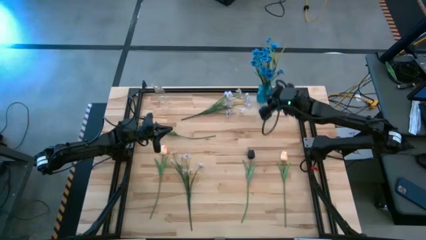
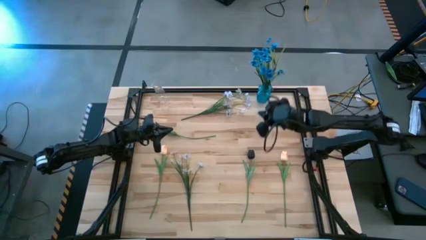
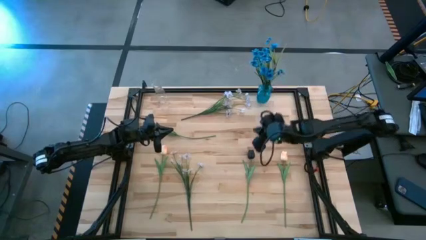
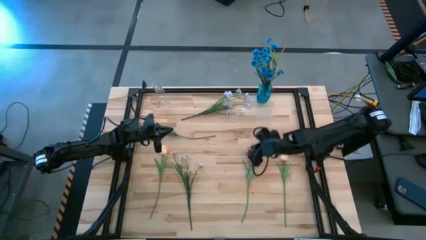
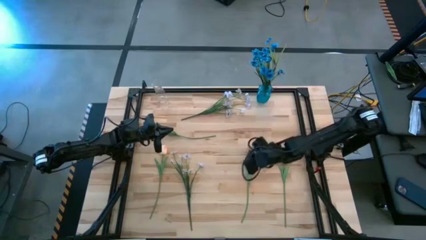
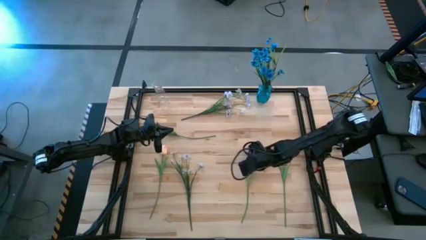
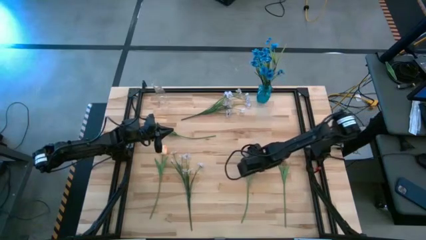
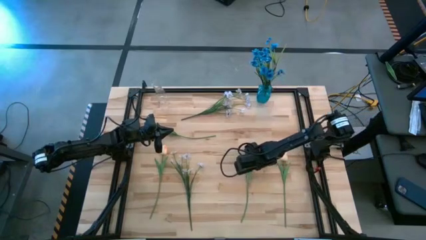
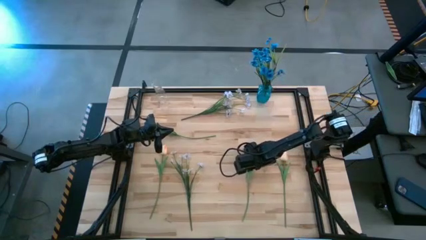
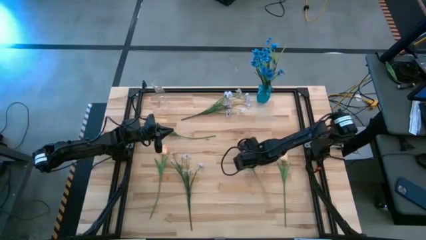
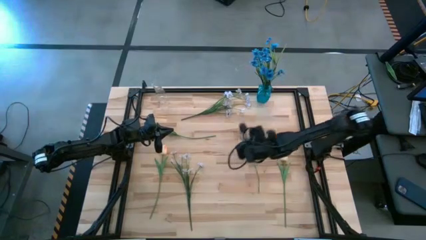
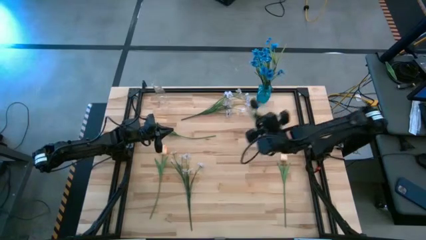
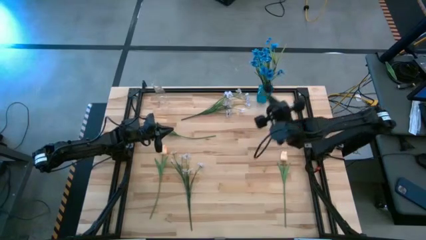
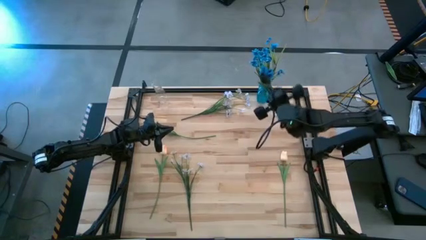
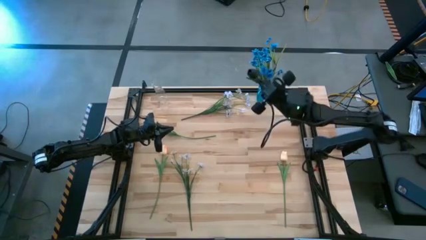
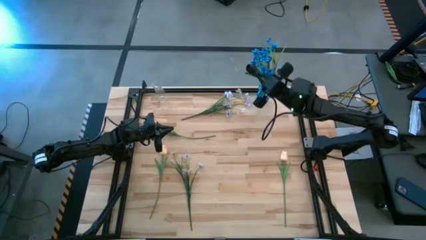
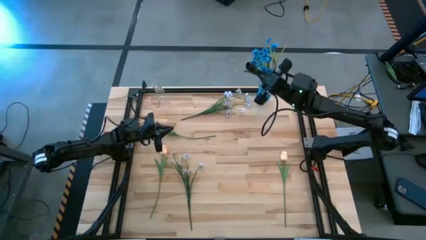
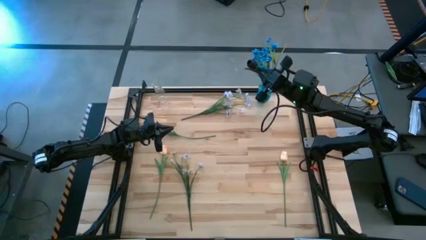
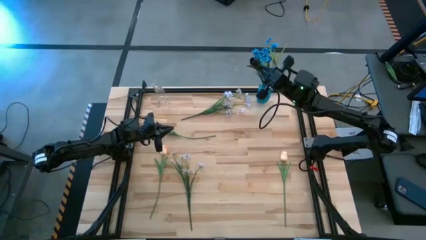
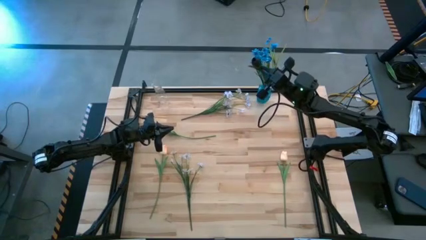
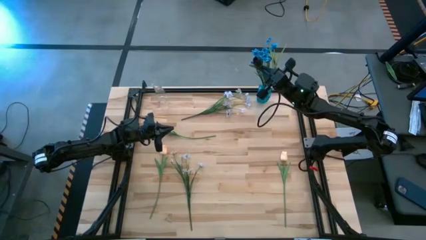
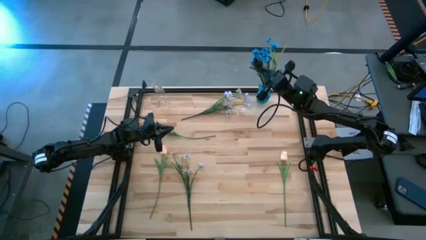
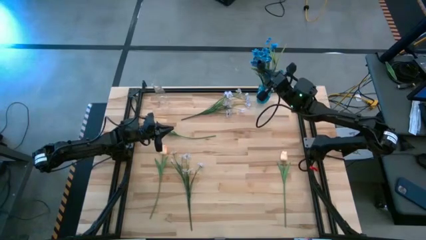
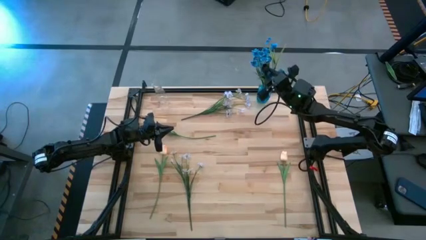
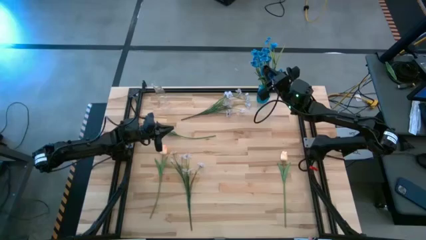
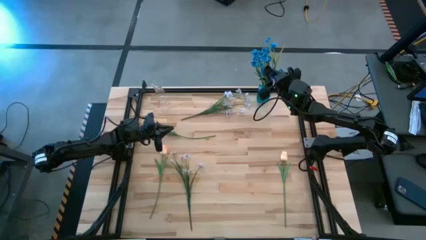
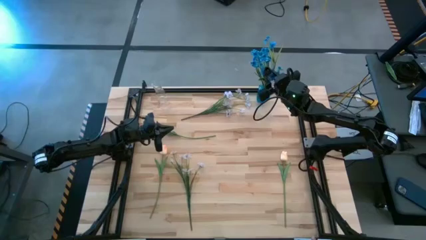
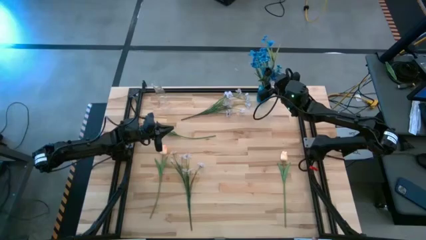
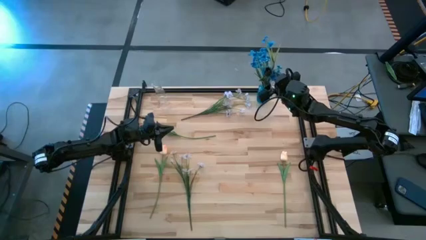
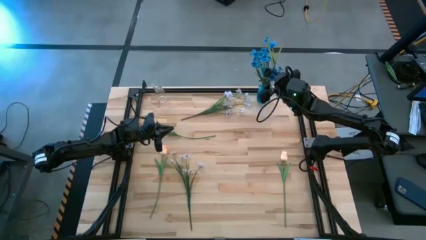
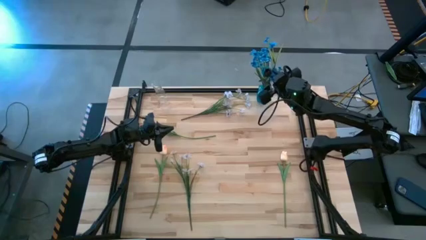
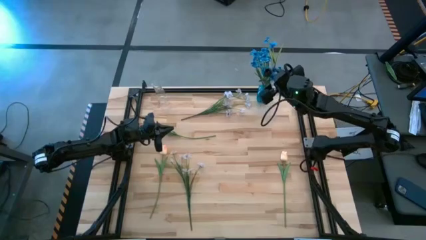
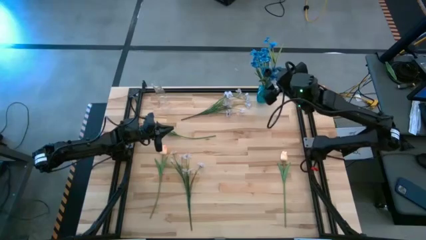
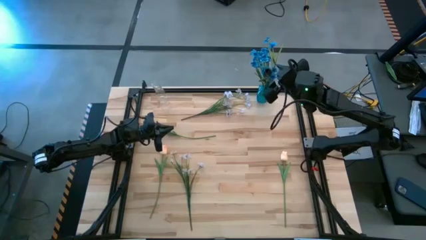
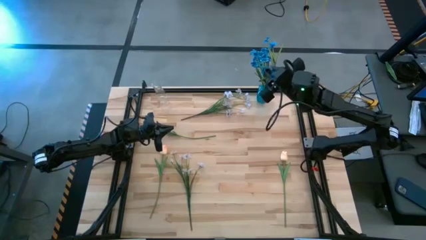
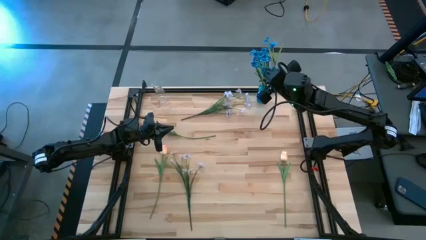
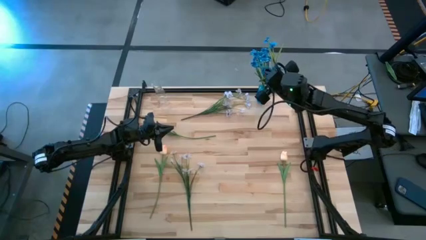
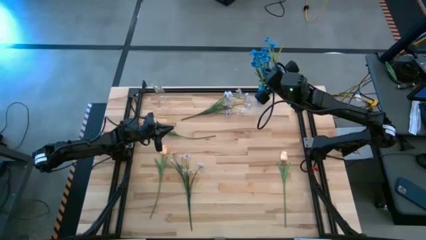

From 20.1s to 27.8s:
Task: Sort flowers into vase by color
Put the right black flower into the blue vase

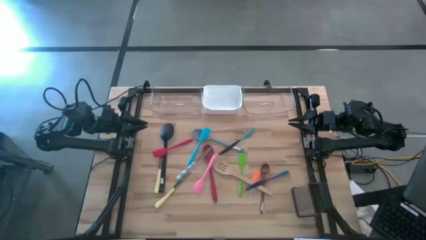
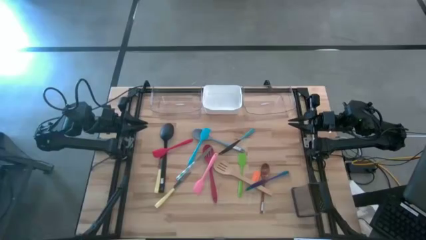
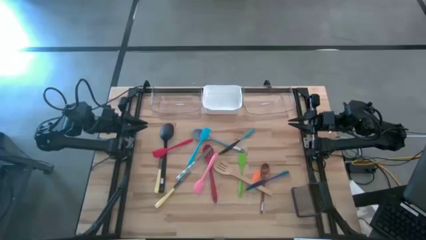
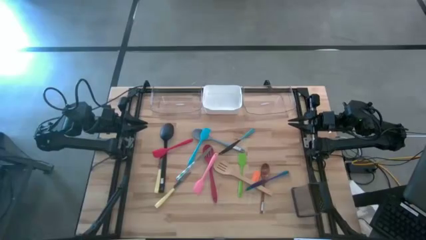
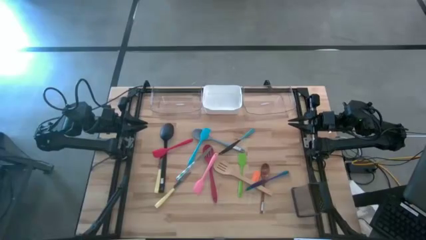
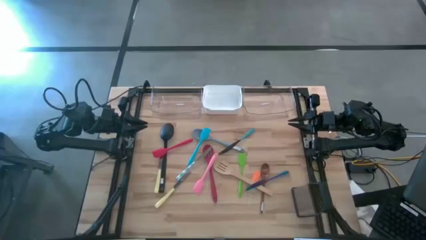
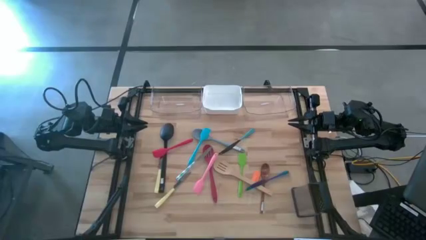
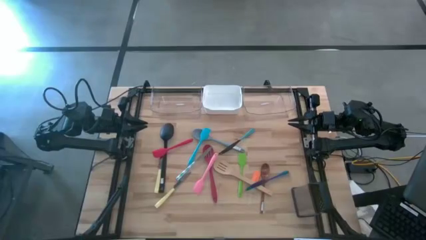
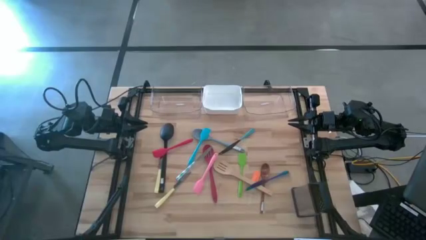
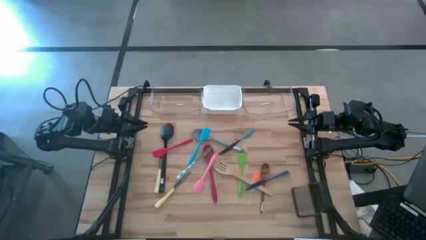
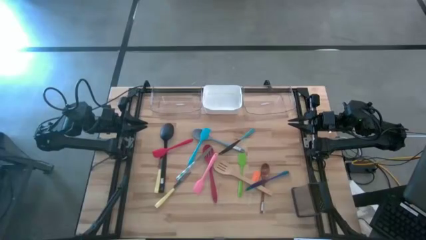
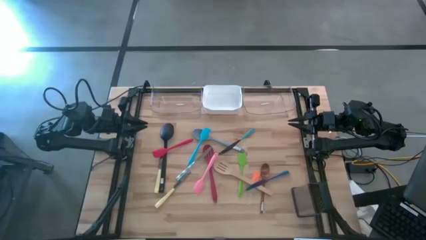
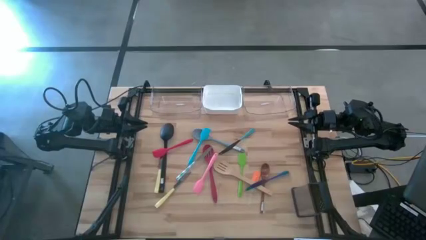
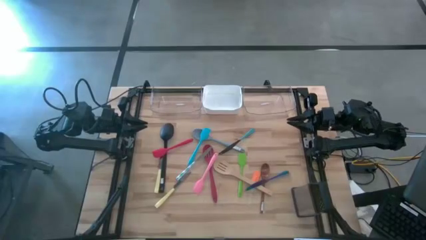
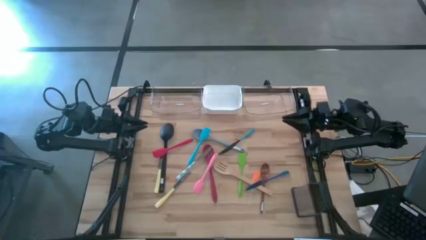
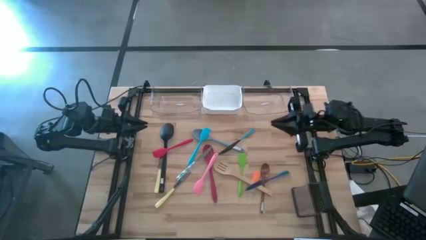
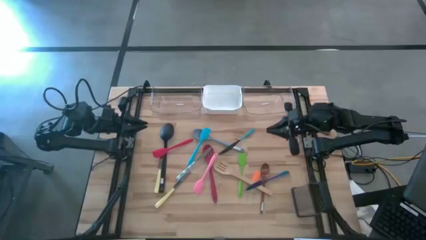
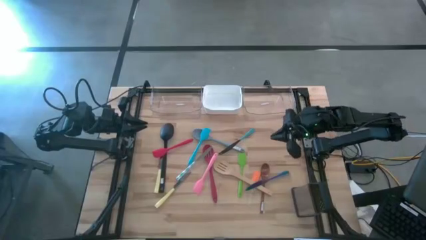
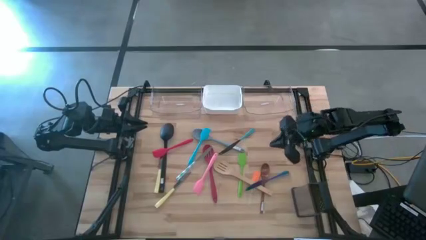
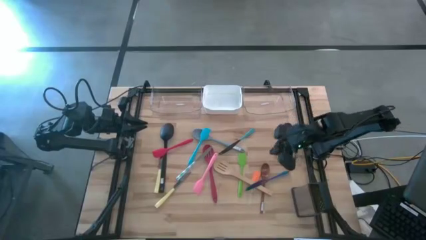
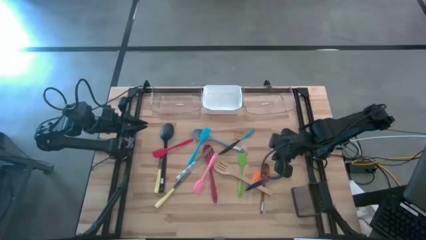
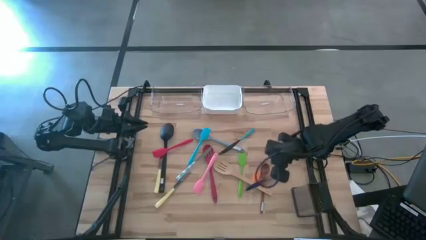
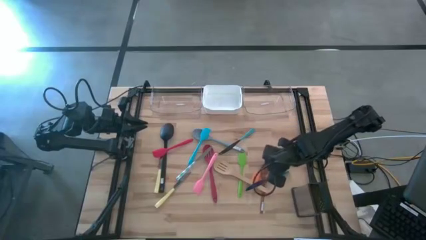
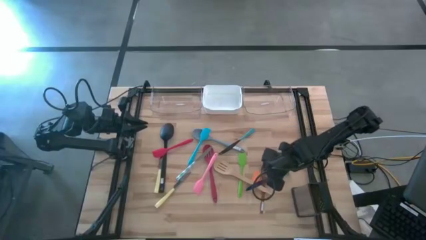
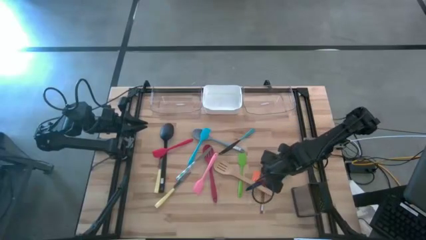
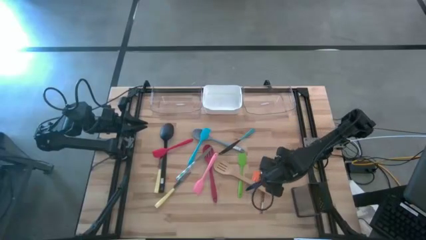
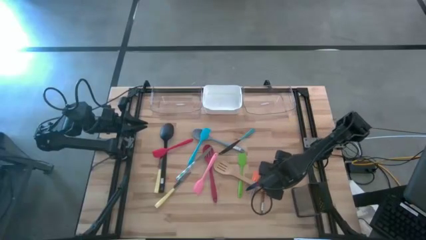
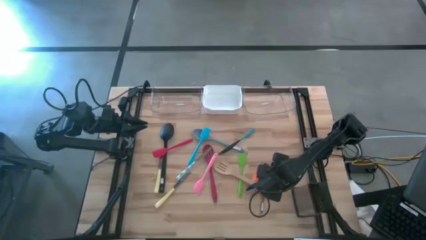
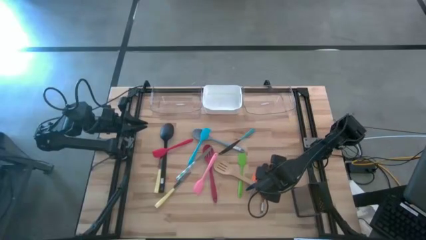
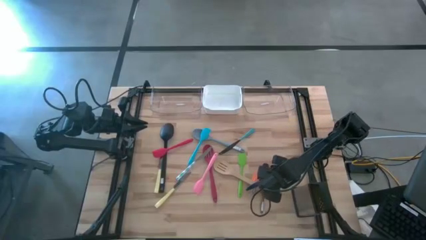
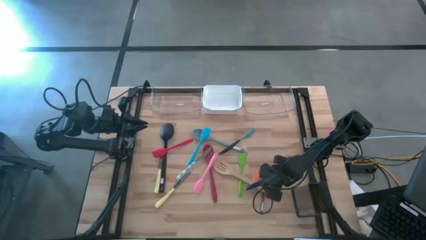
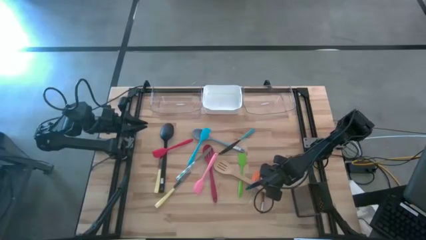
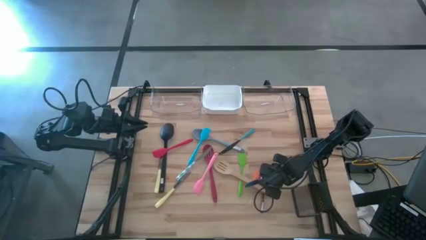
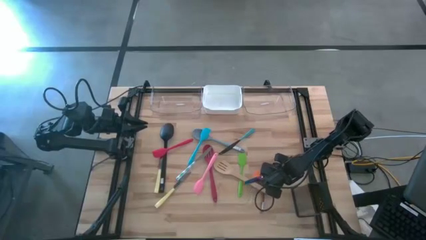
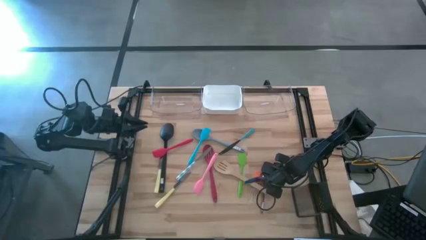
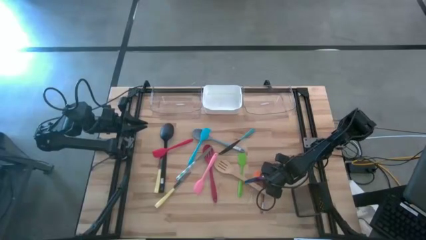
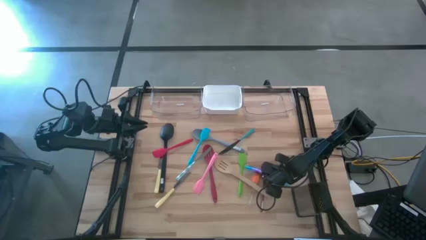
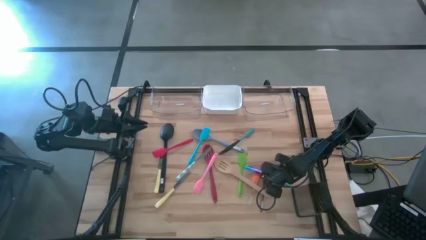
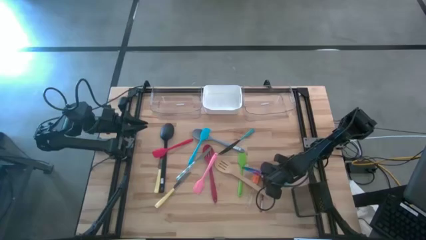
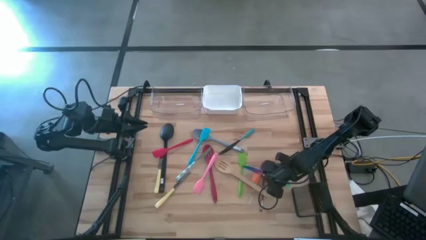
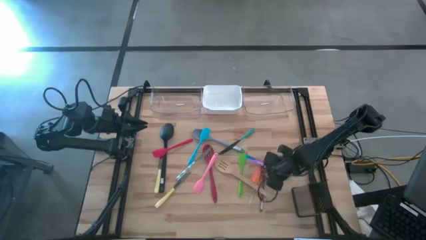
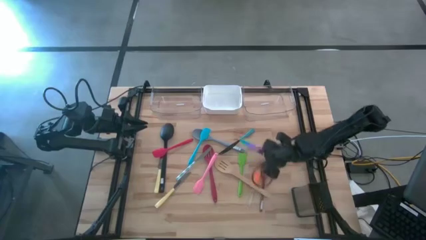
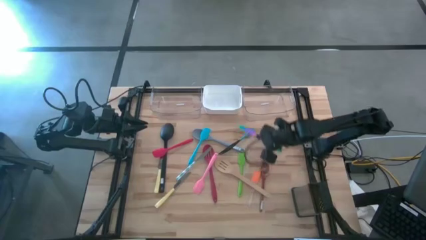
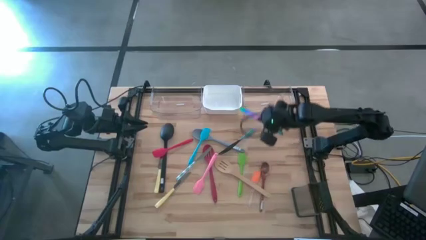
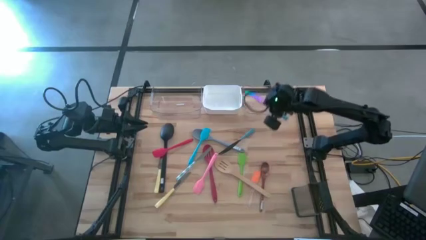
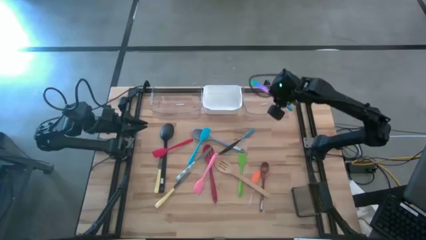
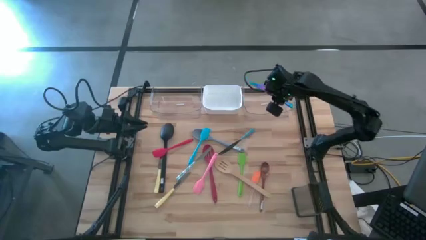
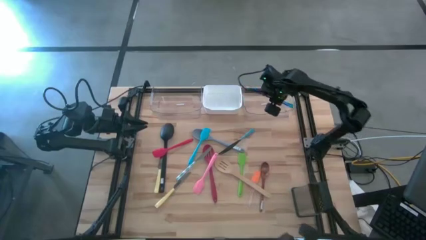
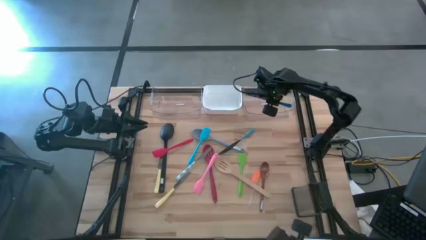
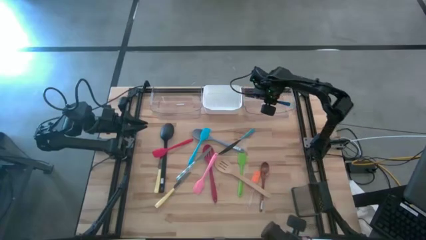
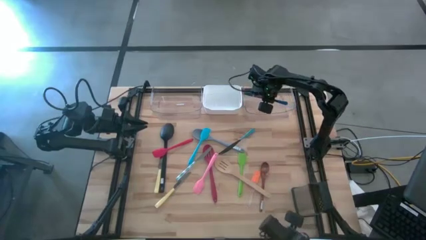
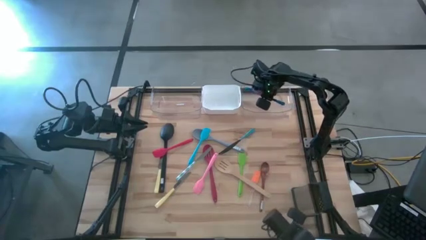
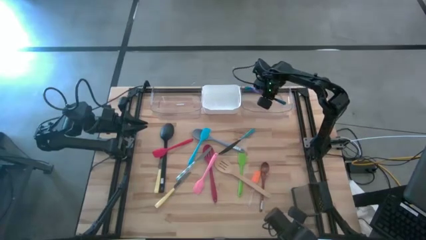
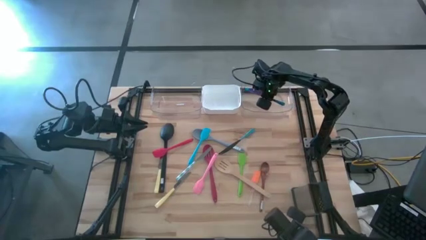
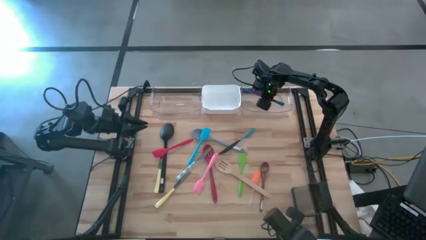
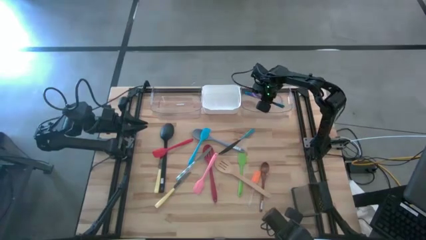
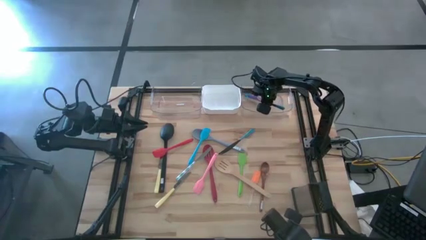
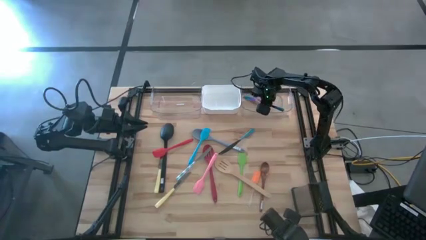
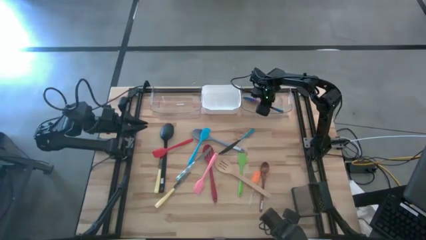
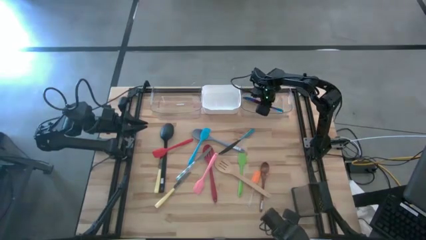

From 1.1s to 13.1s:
Task: Pick & Place Kitchen Items
Put the purple table knife into the right transparent bin
